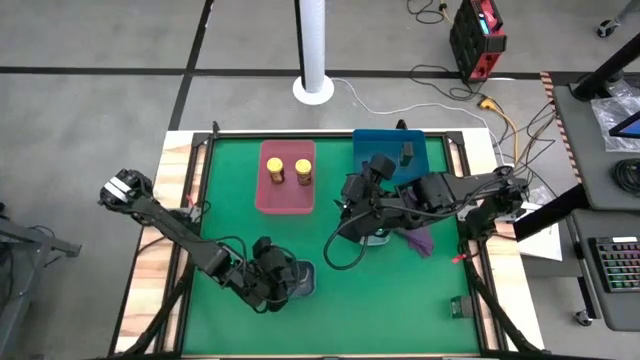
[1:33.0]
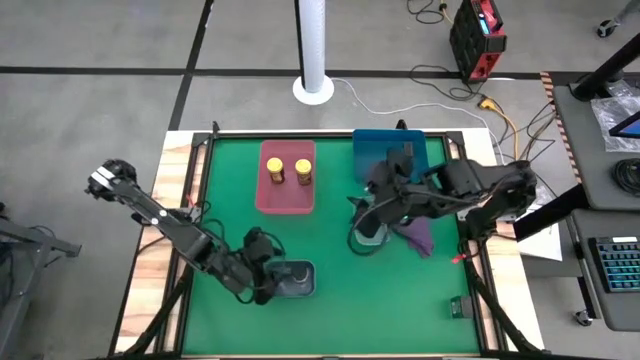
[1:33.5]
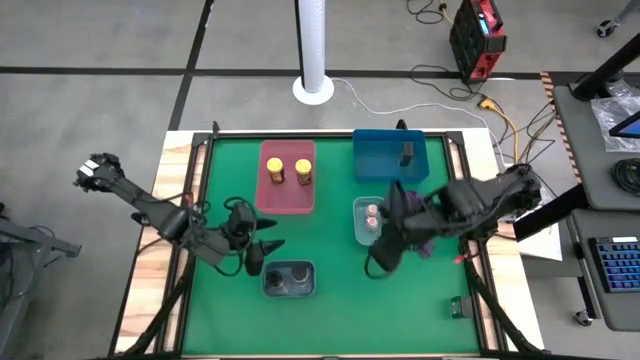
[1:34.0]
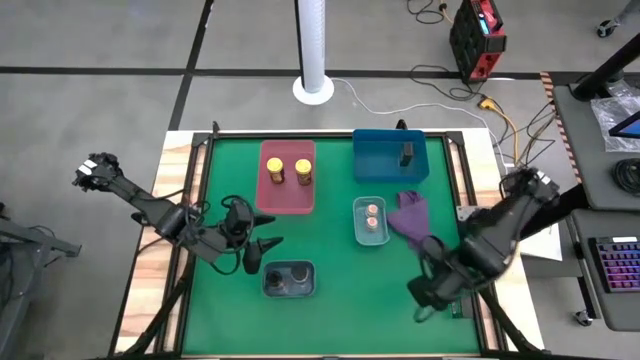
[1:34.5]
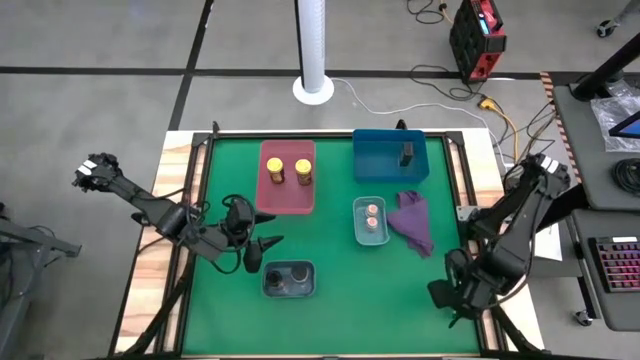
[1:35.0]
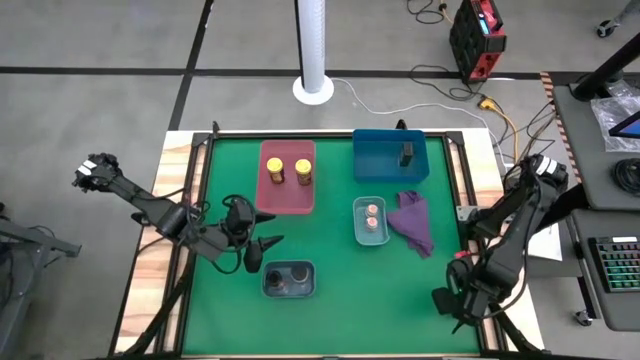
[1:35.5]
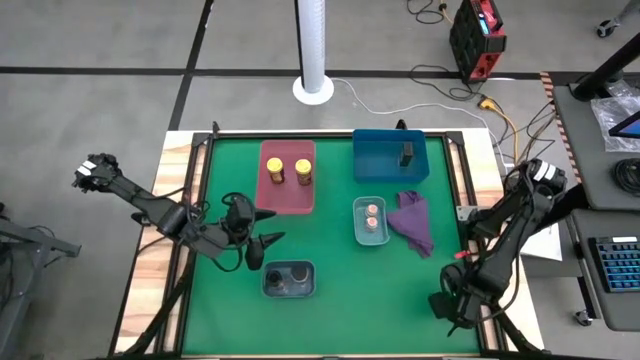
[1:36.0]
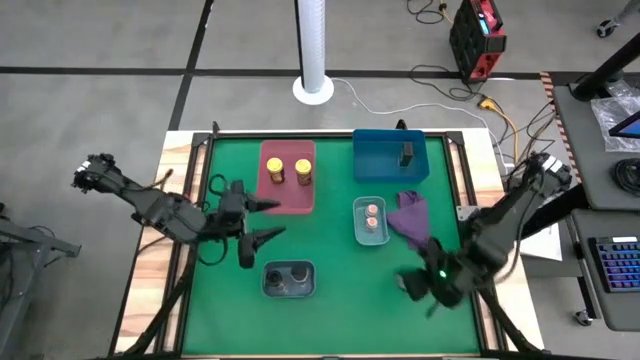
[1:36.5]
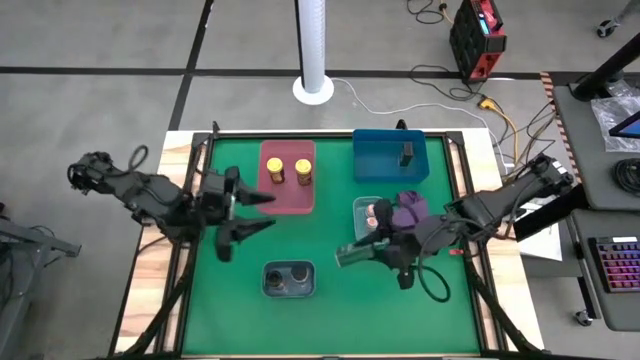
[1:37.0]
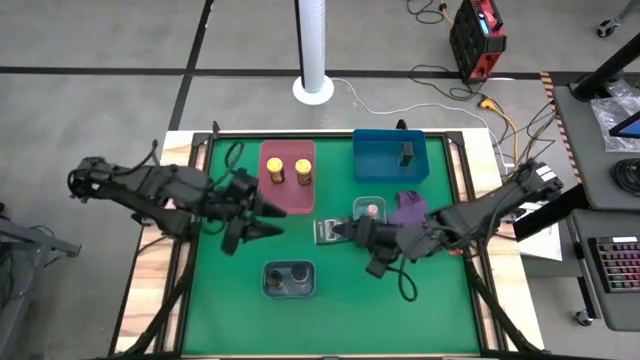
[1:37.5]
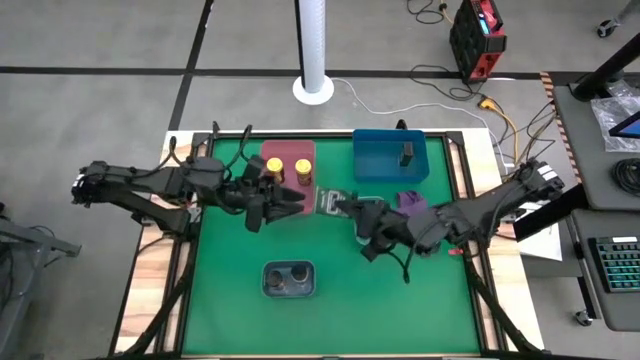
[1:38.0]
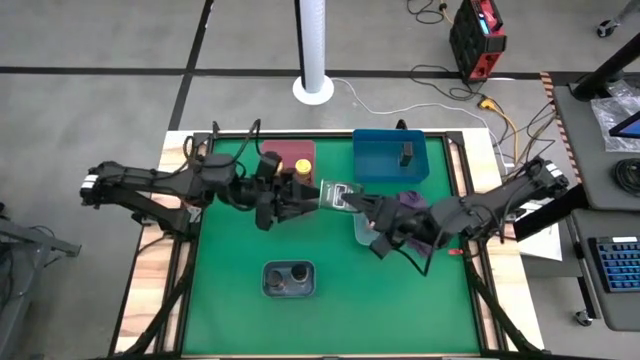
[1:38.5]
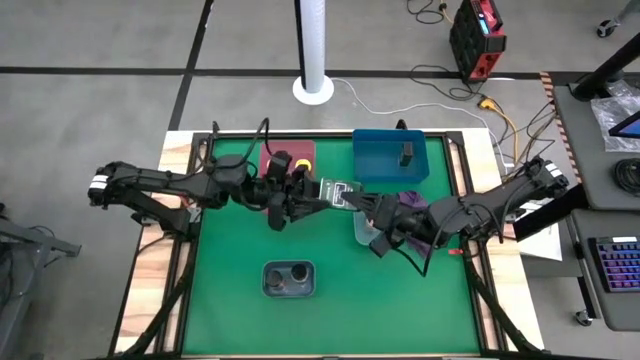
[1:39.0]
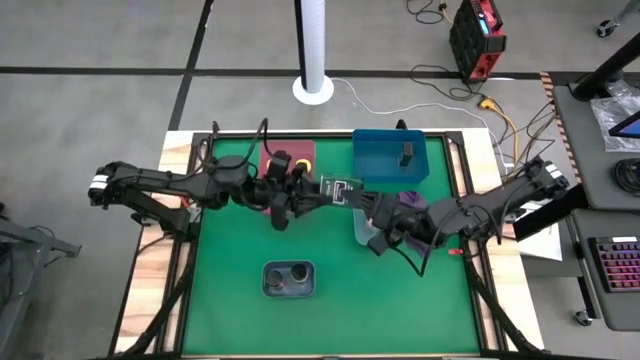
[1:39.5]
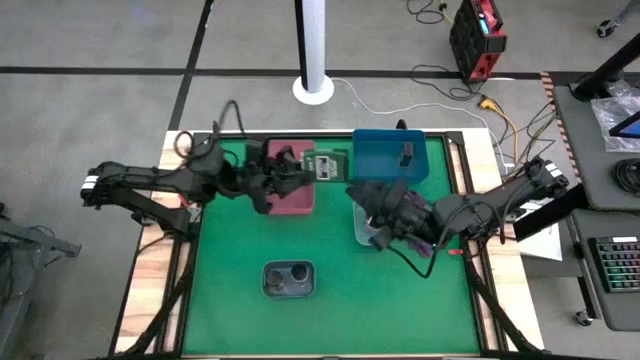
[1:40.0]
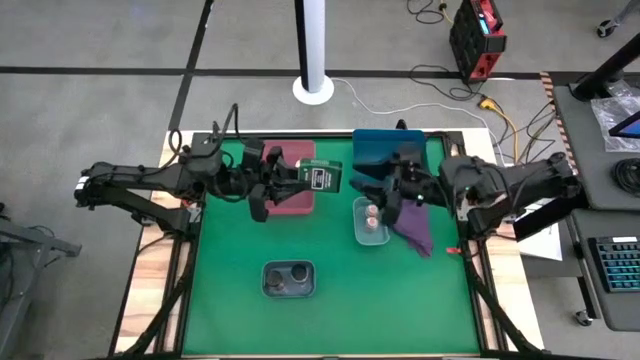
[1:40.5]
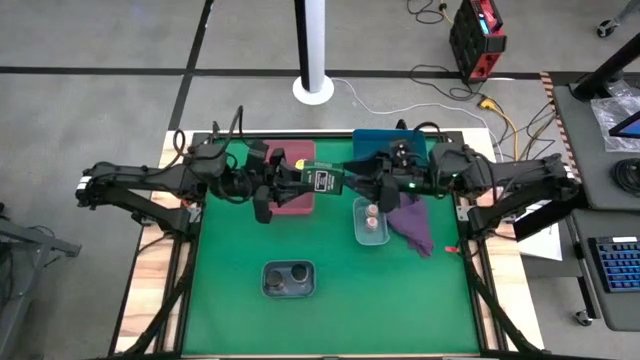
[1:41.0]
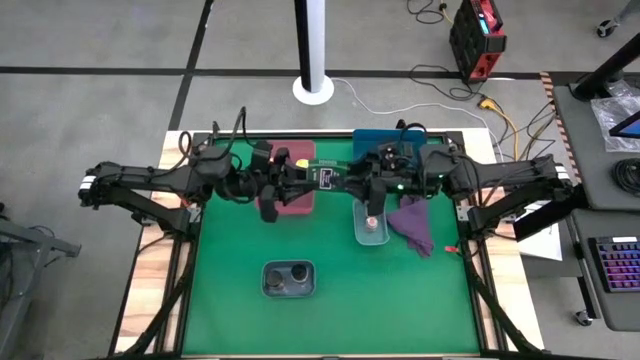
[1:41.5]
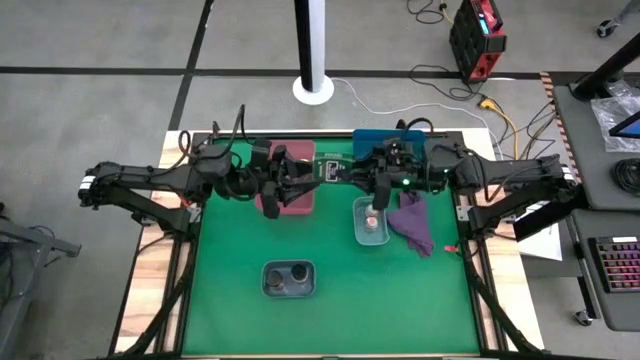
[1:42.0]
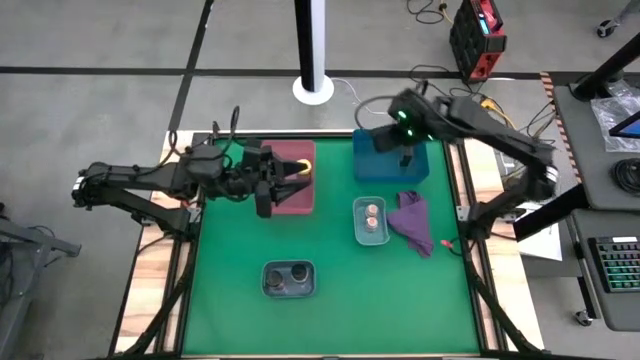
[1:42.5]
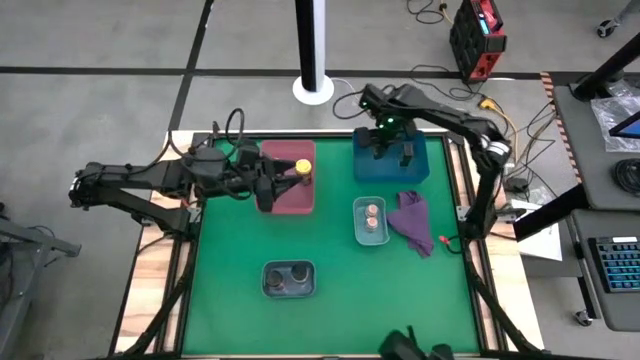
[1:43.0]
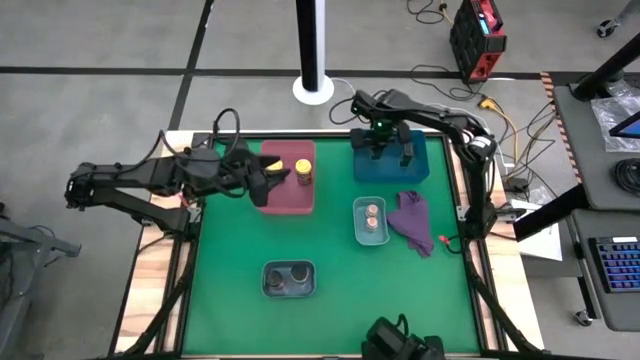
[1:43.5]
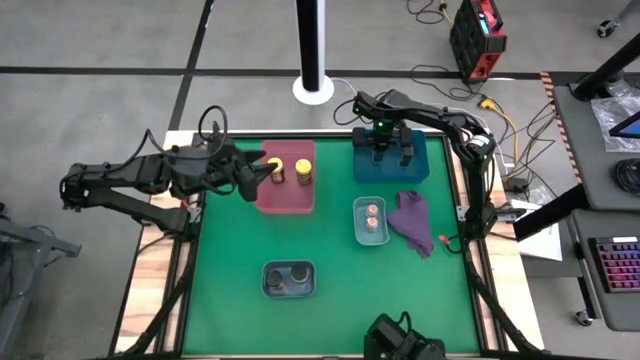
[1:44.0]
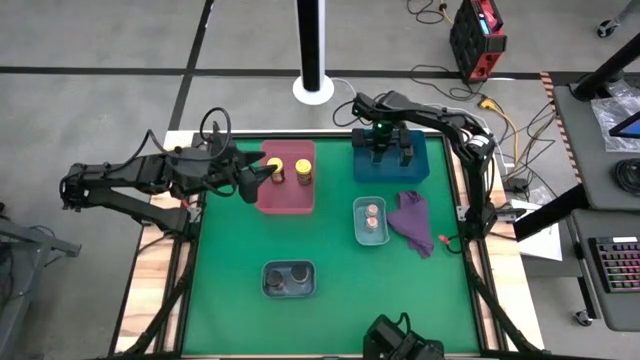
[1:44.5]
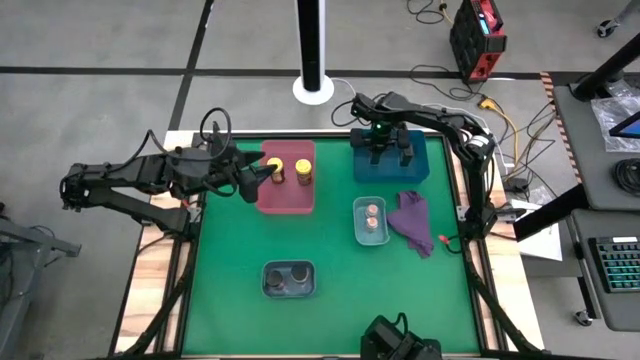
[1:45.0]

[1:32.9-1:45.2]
Task: Sort spices by type
Put the black seasoning can into the large blue bin

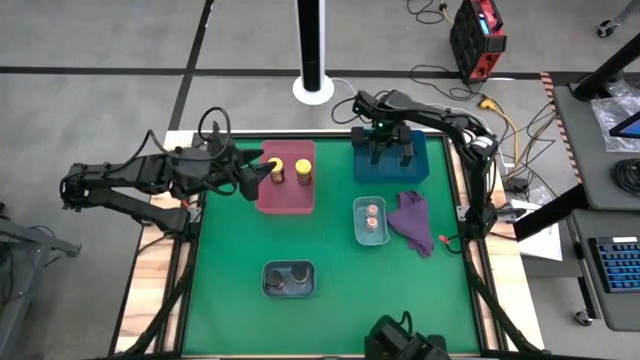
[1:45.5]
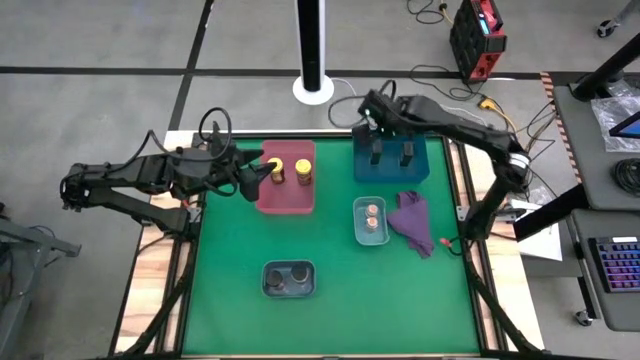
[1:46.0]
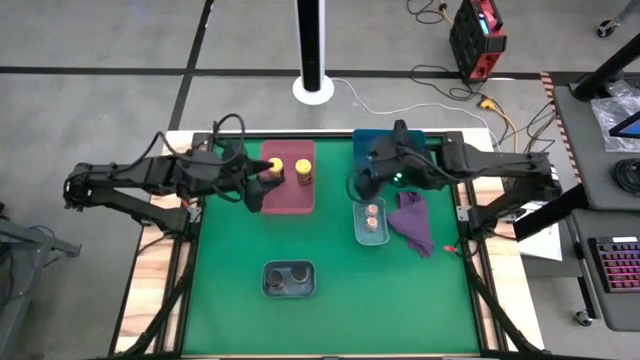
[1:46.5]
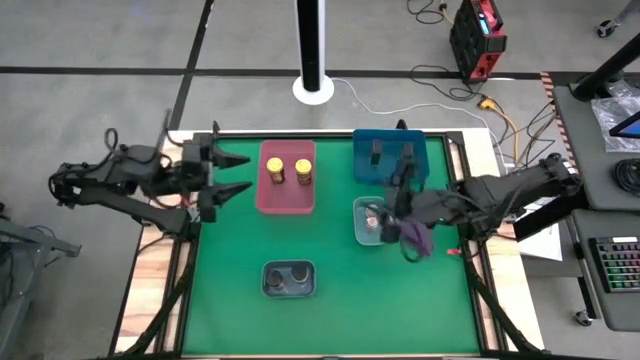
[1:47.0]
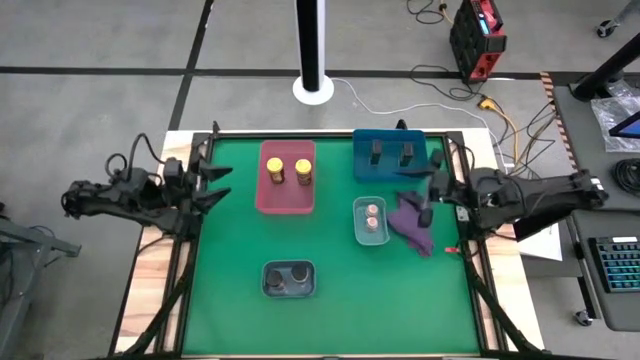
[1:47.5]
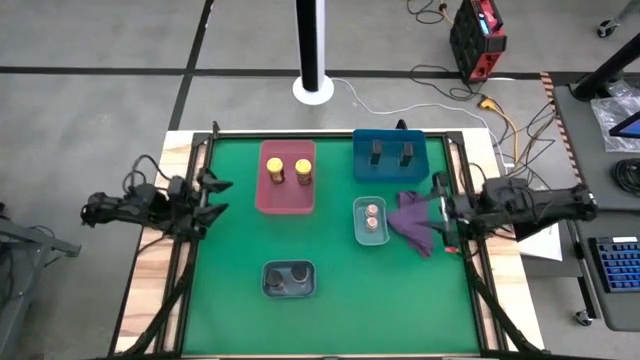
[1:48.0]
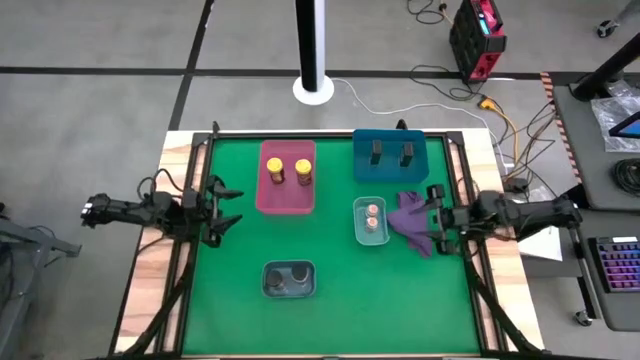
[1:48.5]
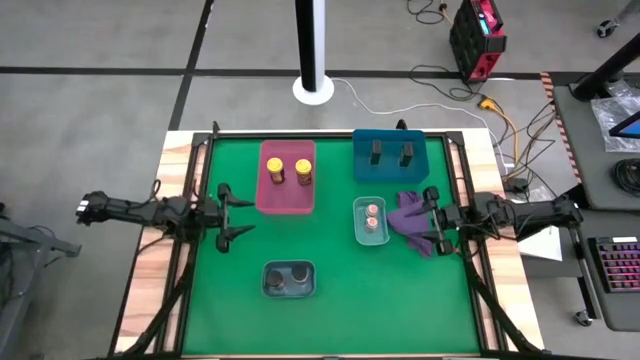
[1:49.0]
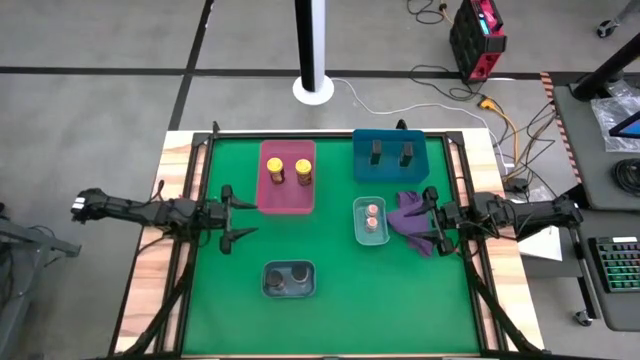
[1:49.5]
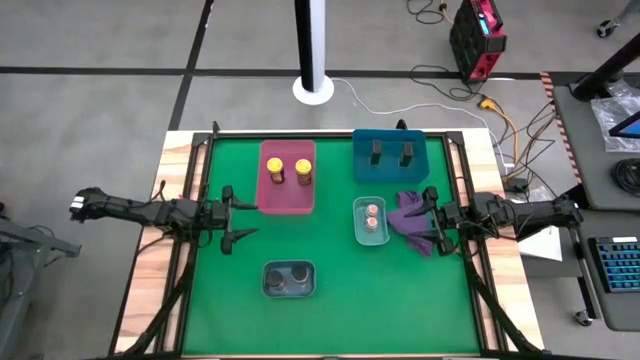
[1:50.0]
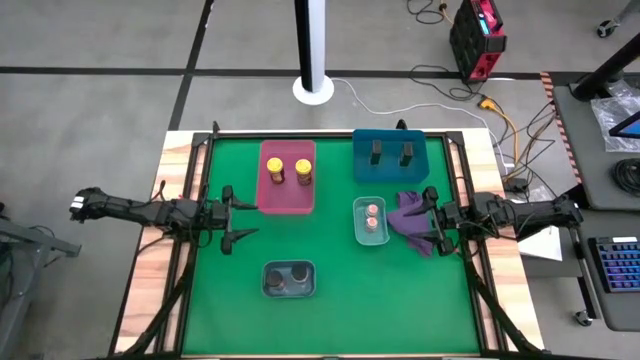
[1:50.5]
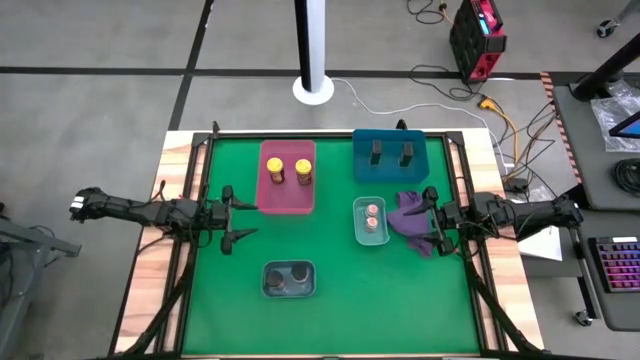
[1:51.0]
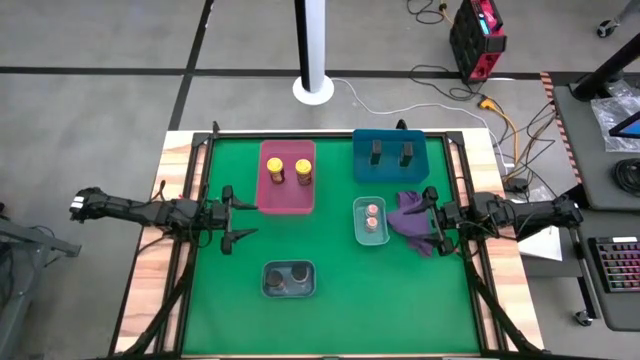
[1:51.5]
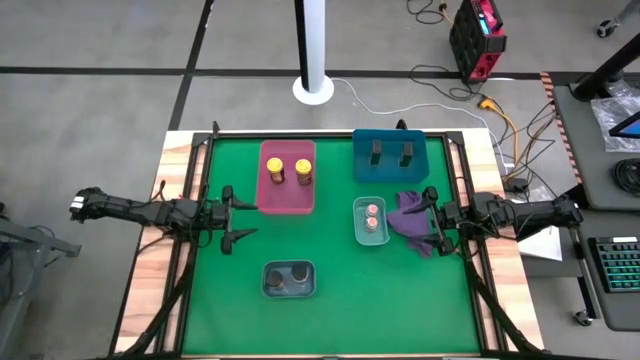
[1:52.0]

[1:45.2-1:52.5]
Return to Home Position

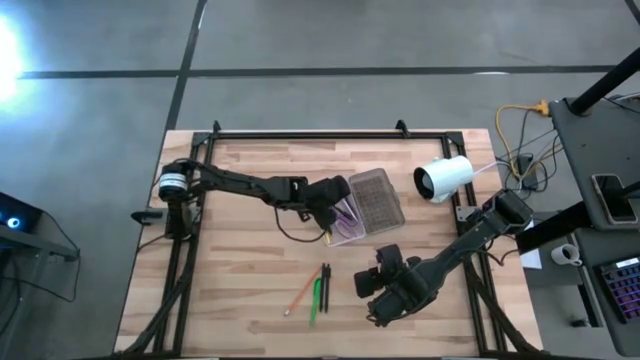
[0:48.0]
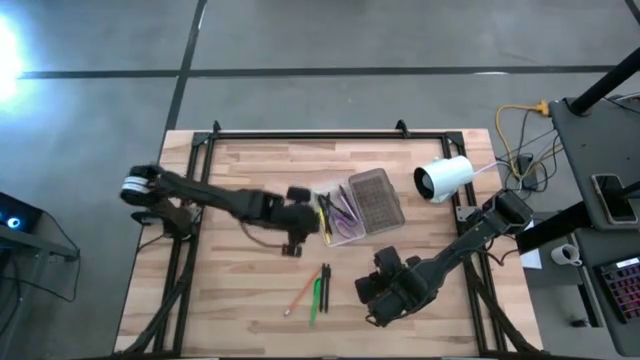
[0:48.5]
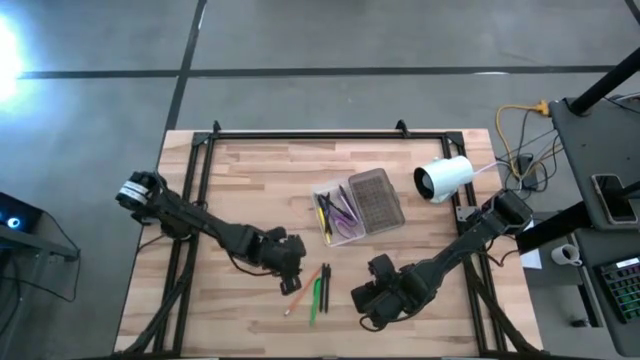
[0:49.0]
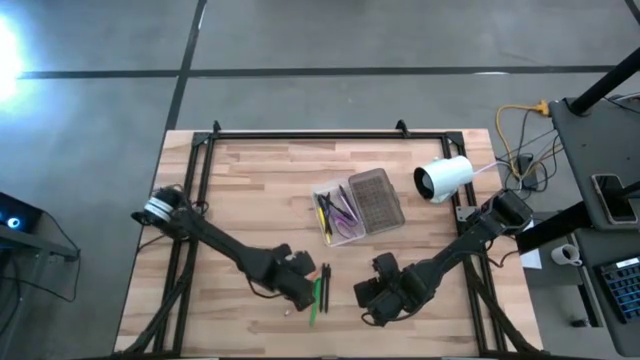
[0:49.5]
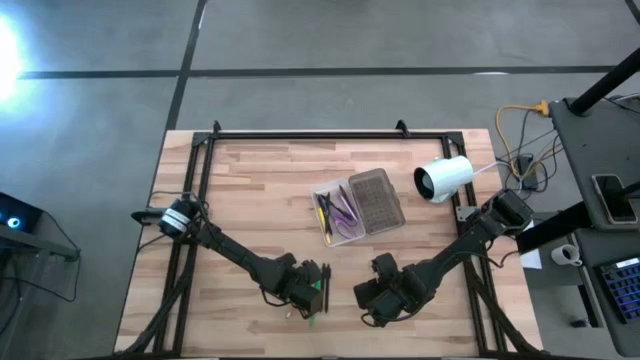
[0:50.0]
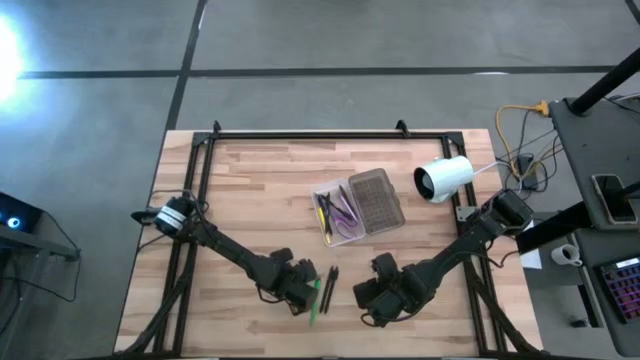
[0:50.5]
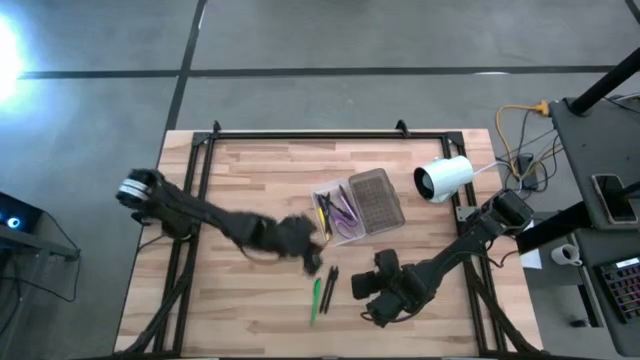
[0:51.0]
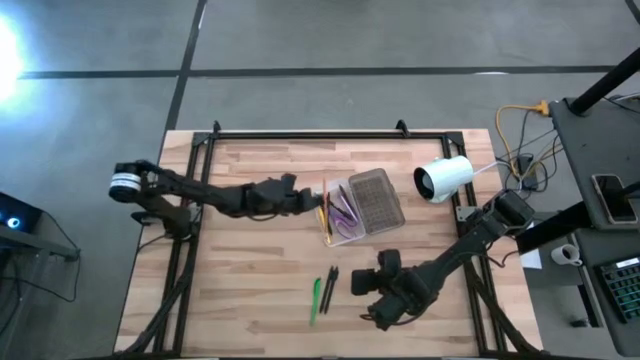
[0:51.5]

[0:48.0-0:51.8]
Task: Pick & place school supplies into a supply box
Put the yellow pencil into the supply box
